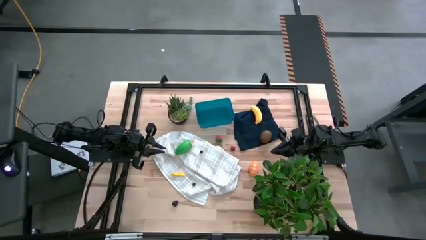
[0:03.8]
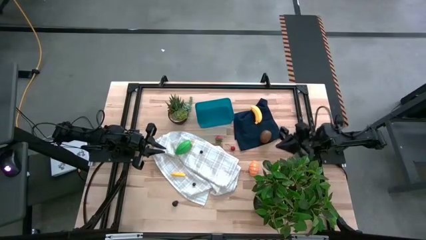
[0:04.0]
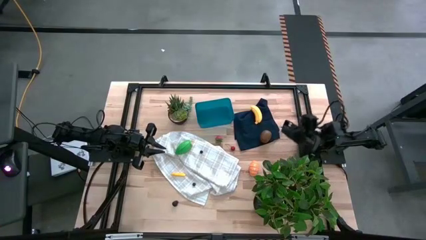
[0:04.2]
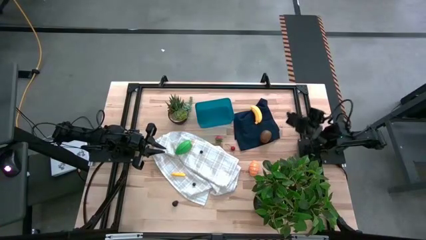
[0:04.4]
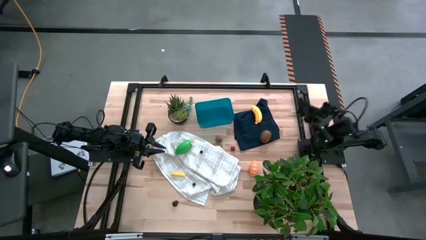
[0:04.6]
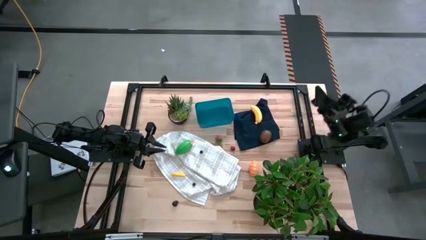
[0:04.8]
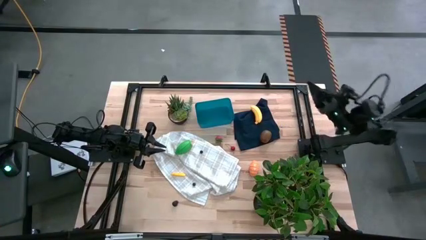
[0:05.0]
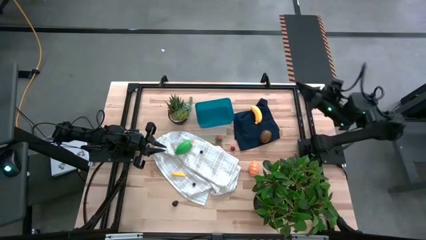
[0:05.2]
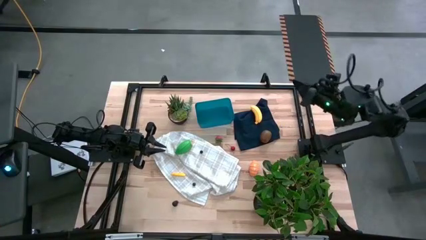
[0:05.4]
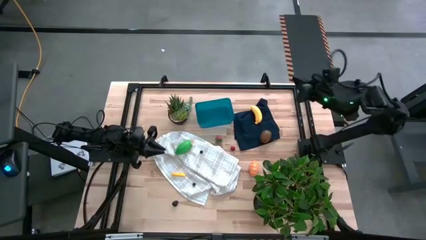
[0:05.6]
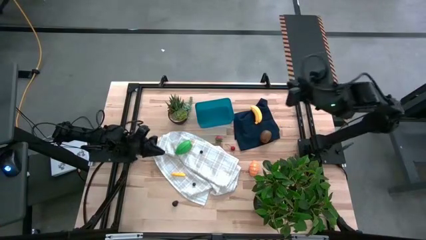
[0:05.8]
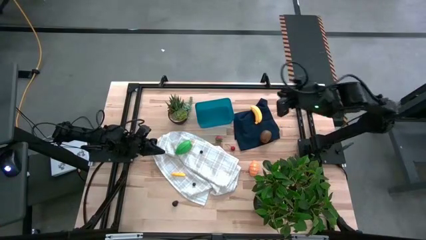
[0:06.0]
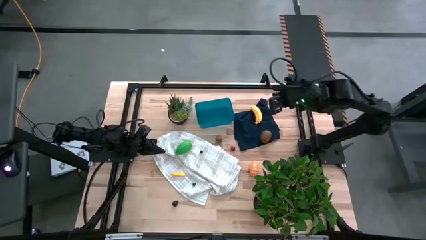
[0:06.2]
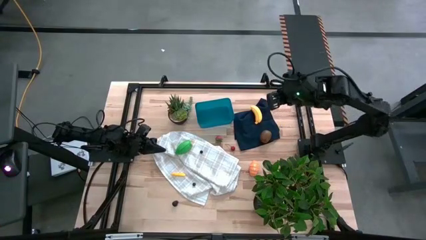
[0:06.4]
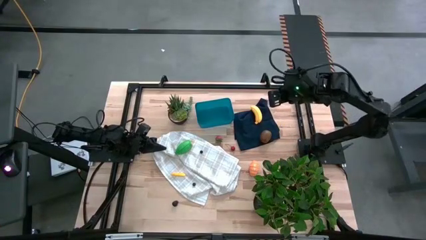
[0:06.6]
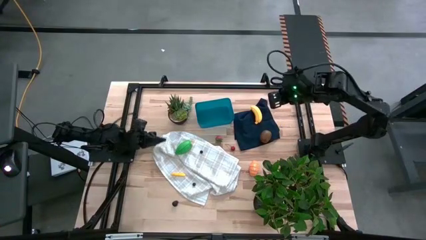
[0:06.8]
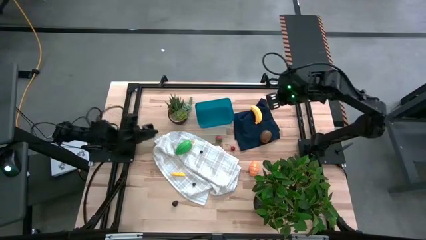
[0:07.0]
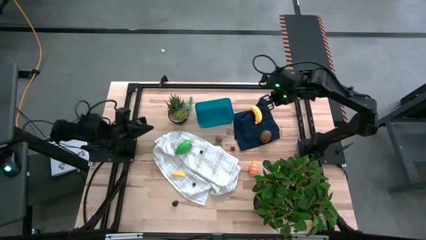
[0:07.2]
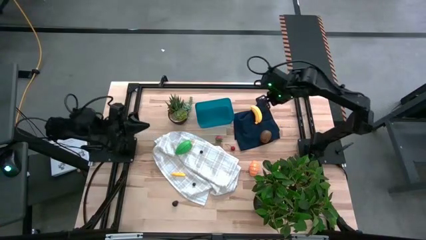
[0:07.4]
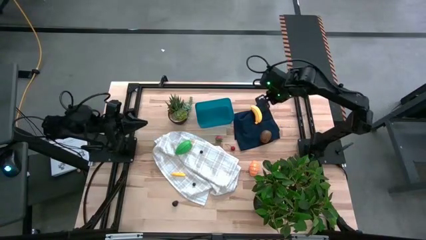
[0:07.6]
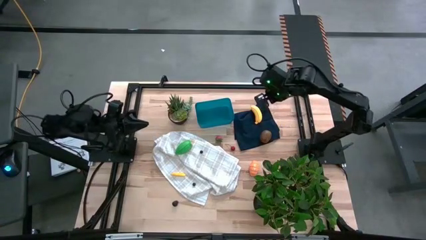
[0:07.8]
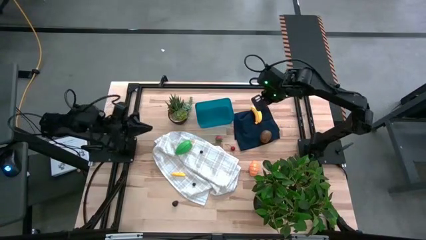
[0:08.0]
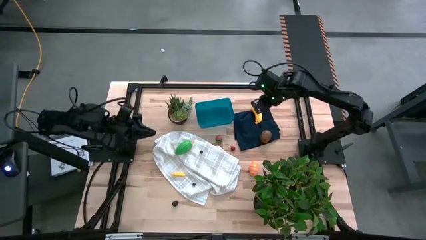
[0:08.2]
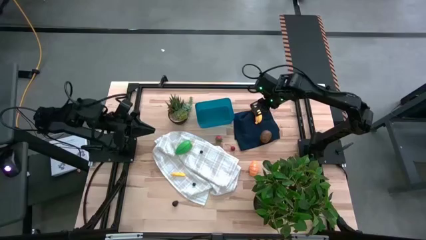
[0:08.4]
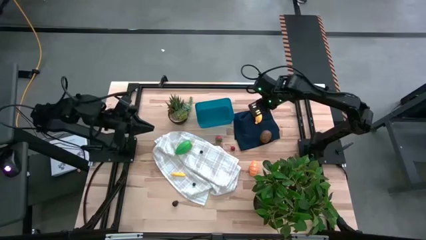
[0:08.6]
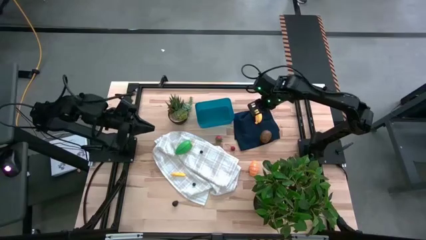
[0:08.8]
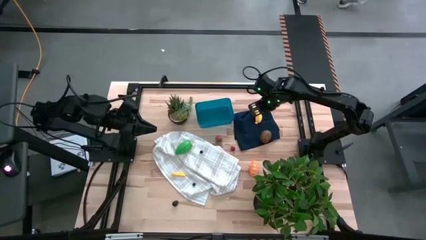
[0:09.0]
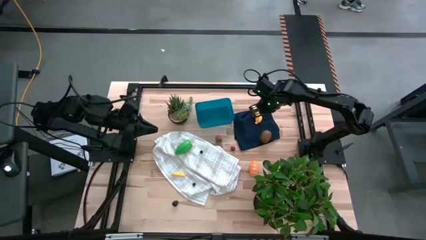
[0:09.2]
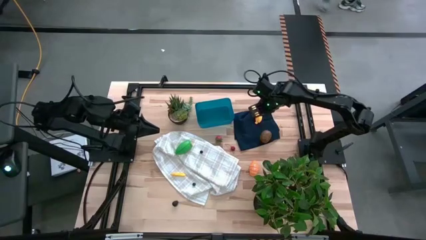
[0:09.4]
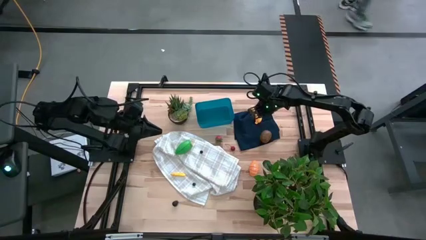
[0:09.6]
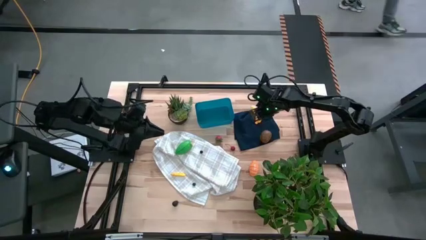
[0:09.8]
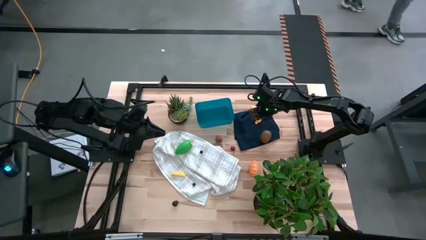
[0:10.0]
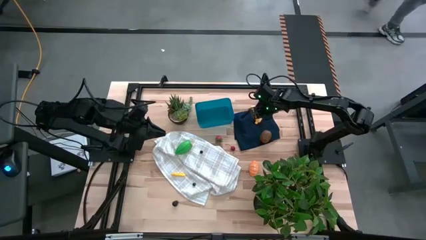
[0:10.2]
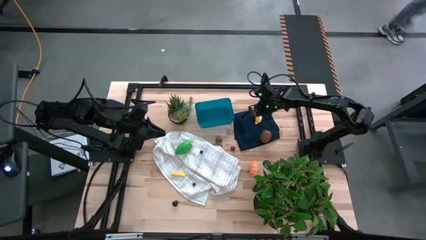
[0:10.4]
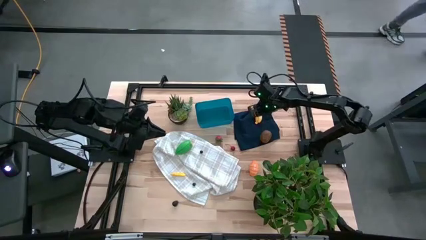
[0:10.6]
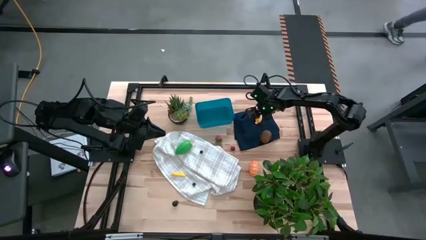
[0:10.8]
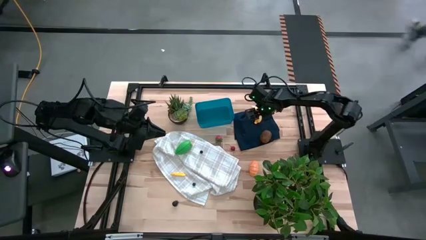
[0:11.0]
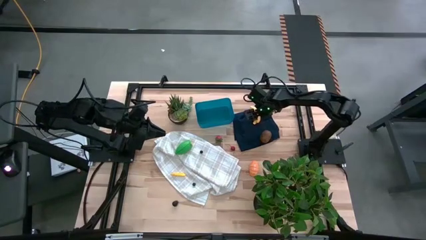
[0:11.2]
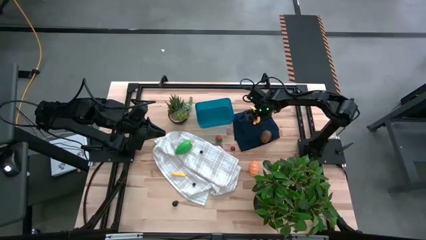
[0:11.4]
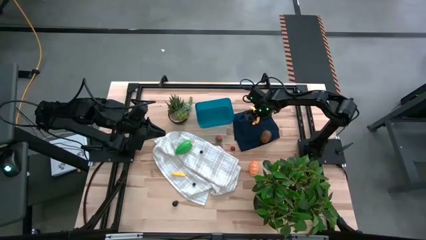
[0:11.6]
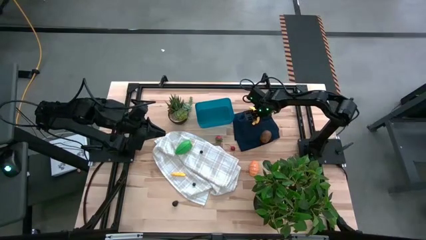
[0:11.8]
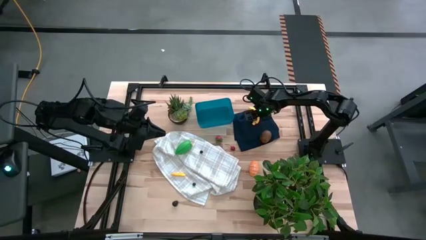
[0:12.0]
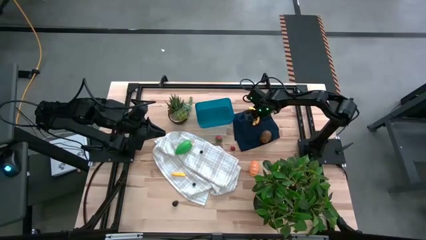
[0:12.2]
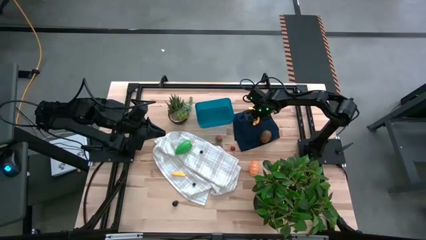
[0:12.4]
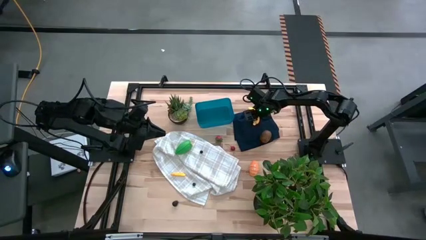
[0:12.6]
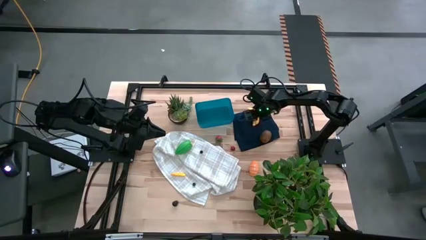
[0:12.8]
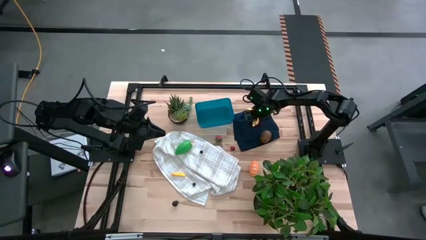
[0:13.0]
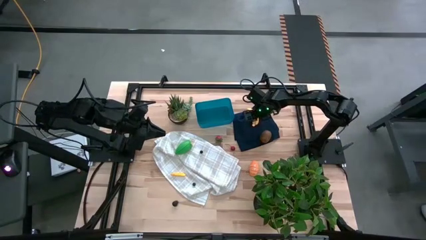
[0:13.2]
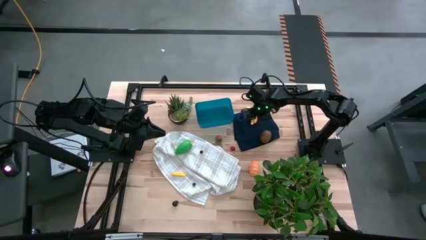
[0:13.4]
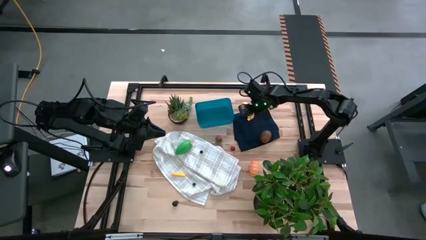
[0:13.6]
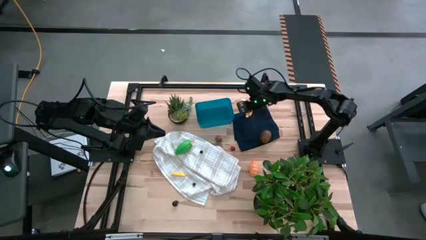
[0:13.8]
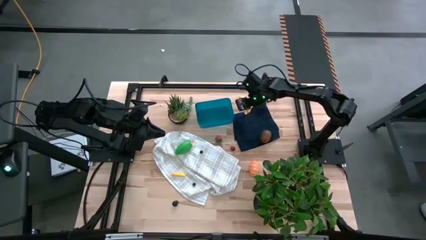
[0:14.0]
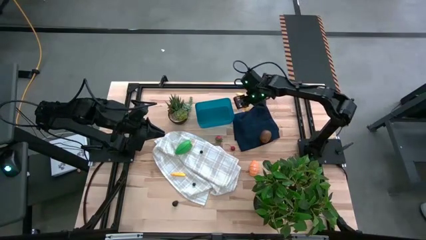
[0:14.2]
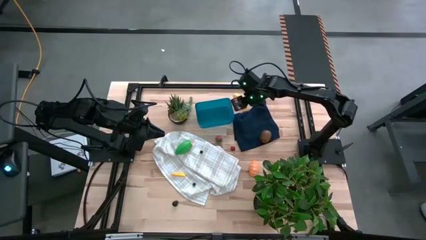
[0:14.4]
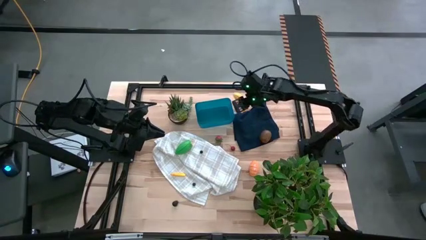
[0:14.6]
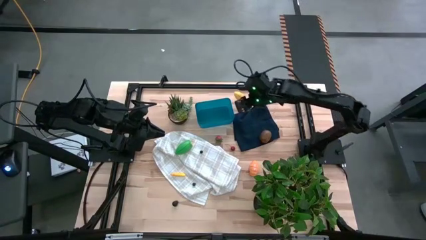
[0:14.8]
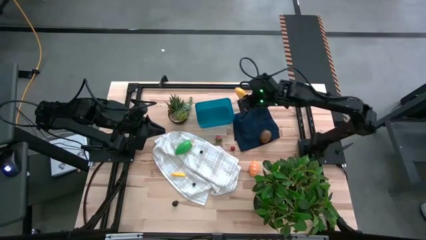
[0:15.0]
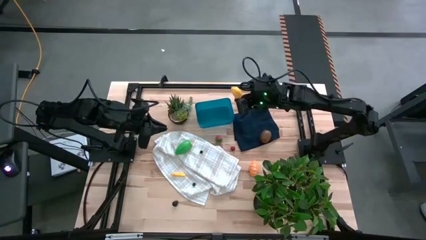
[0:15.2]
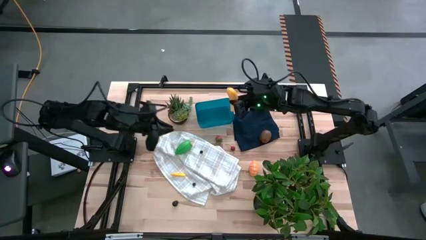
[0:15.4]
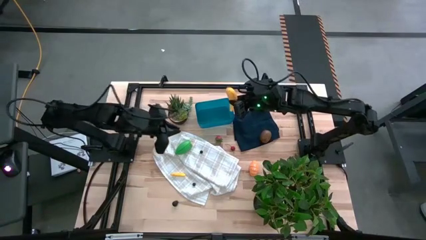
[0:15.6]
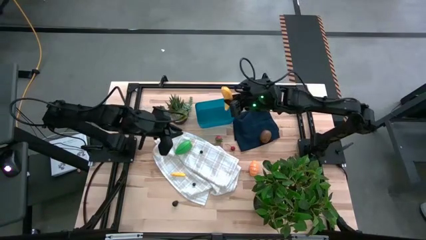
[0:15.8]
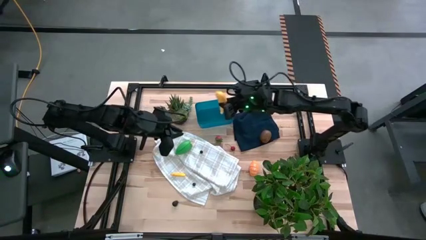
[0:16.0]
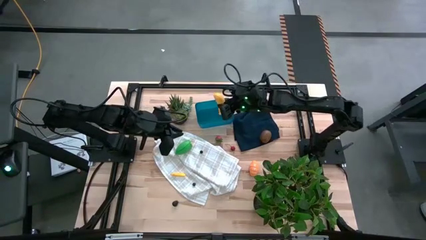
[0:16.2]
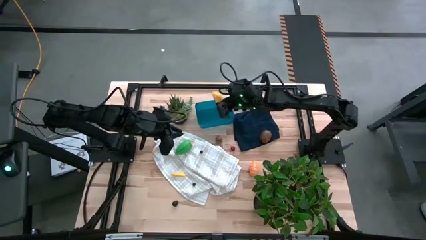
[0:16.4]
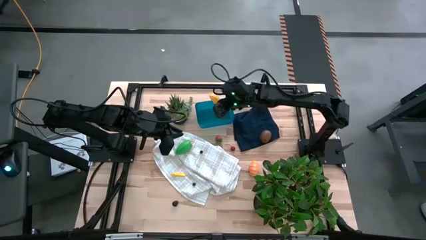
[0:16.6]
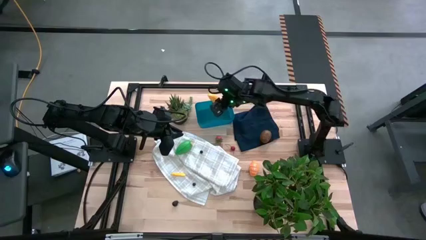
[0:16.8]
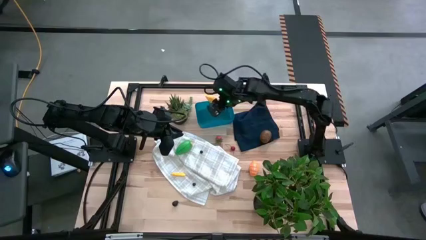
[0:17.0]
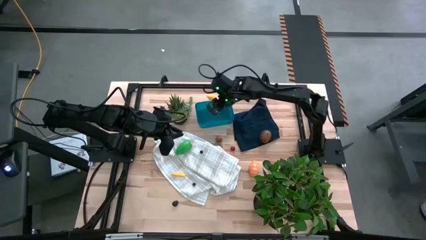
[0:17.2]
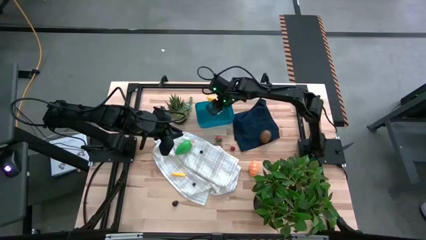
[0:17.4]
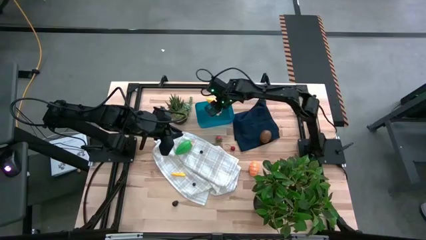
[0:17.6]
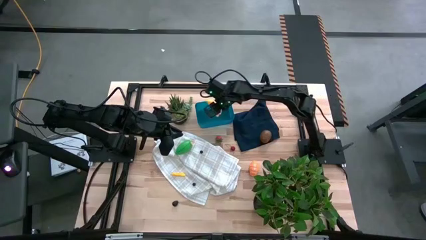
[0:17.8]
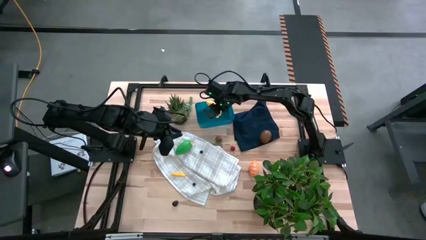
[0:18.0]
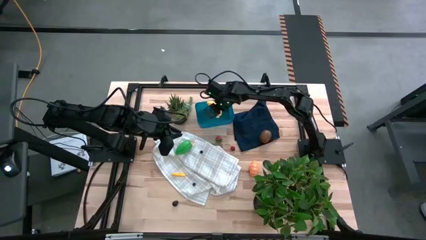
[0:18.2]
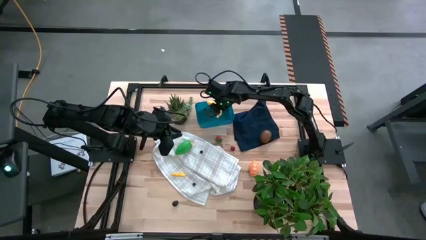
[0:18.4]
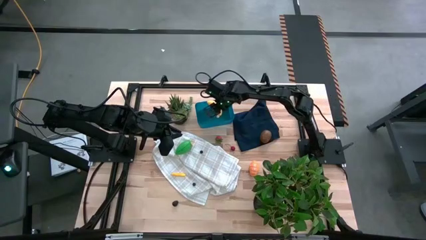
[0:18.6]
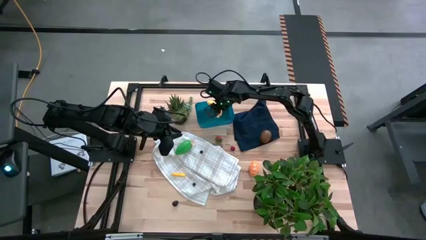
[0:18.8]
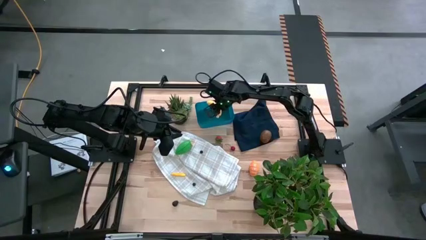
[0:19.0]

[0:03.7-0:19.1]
Task: Pick and placing Produce into tupperware
Put the banana into the blue bin
